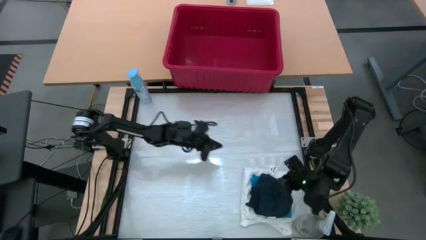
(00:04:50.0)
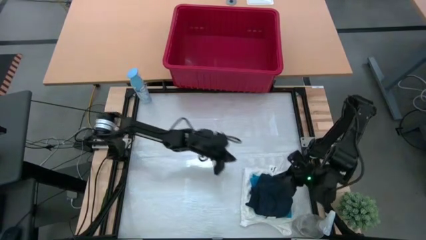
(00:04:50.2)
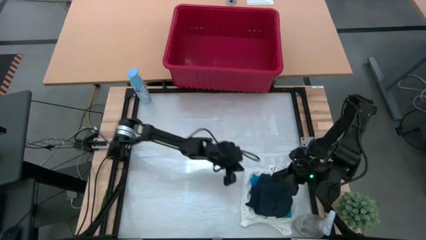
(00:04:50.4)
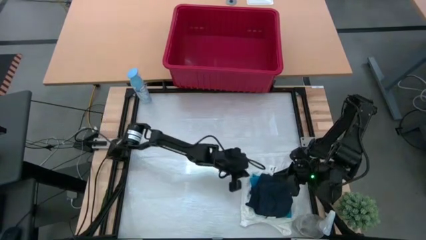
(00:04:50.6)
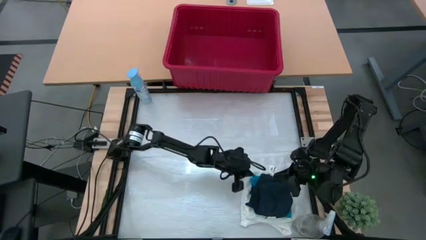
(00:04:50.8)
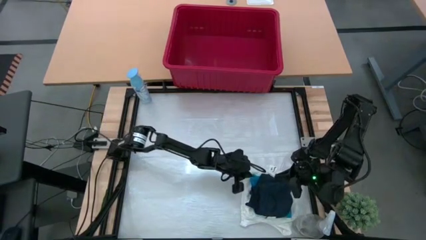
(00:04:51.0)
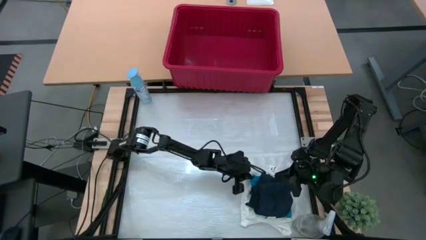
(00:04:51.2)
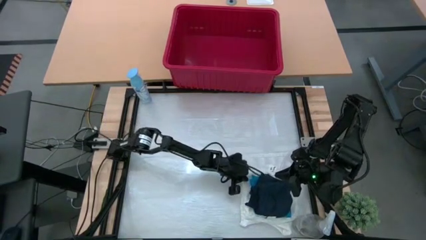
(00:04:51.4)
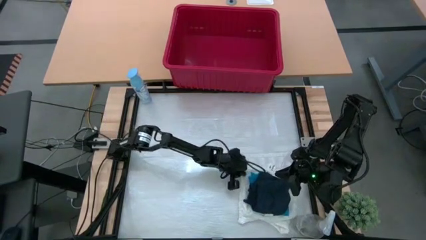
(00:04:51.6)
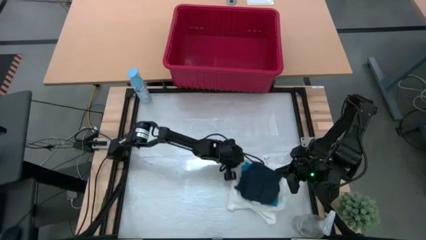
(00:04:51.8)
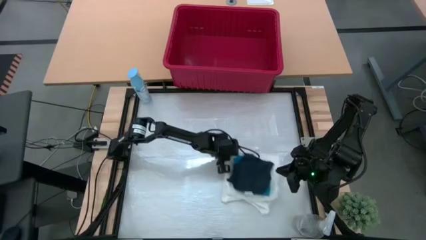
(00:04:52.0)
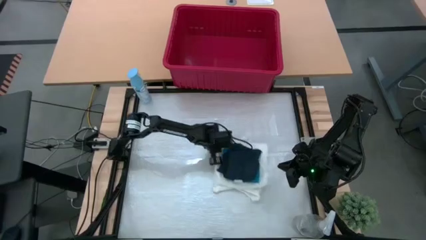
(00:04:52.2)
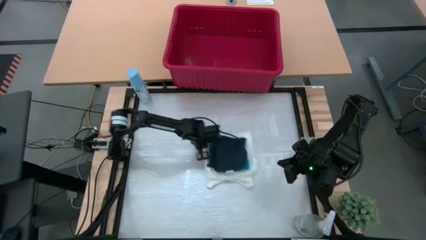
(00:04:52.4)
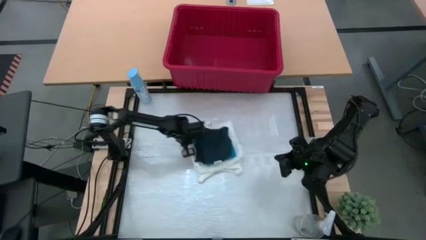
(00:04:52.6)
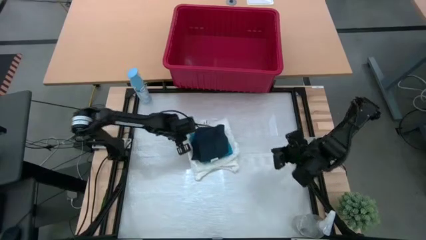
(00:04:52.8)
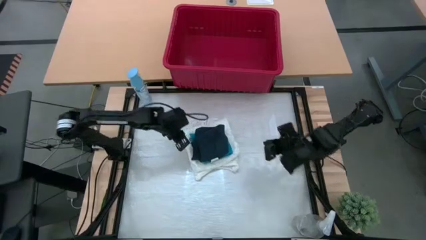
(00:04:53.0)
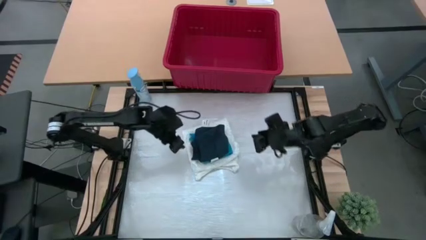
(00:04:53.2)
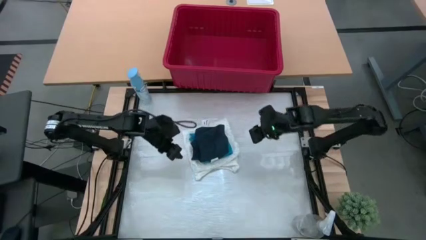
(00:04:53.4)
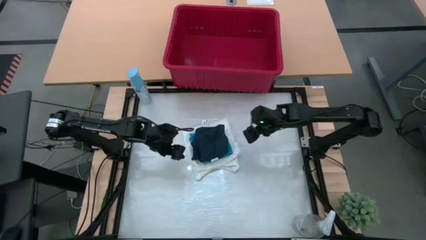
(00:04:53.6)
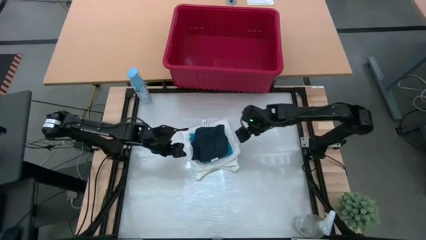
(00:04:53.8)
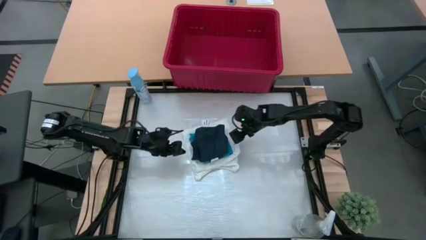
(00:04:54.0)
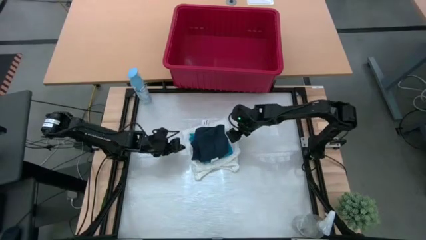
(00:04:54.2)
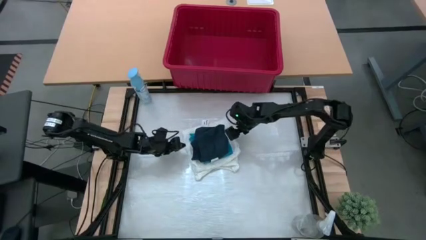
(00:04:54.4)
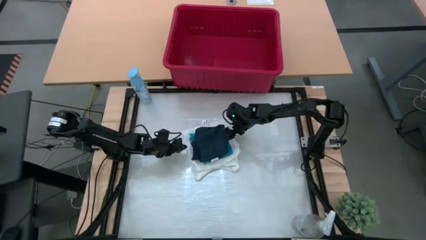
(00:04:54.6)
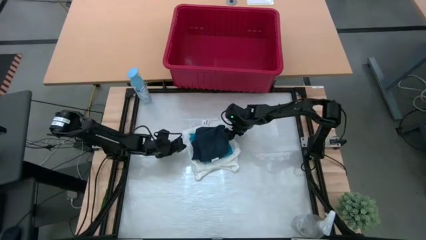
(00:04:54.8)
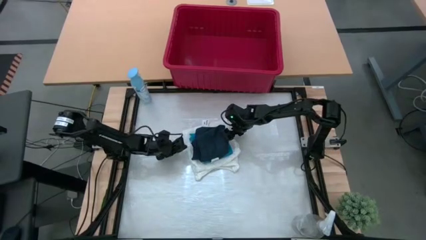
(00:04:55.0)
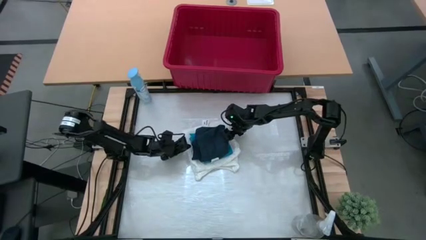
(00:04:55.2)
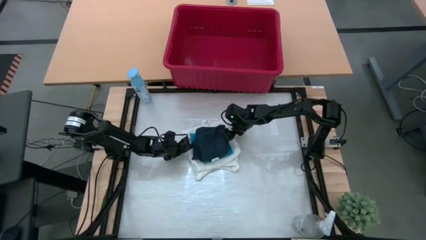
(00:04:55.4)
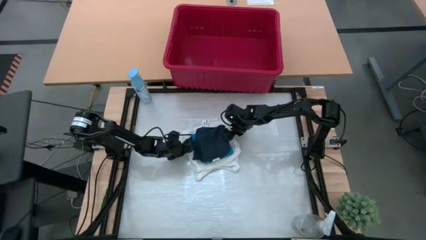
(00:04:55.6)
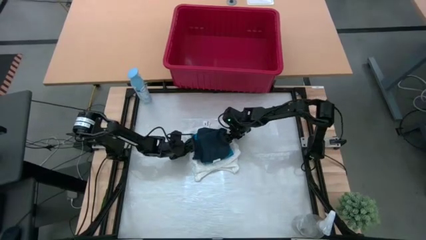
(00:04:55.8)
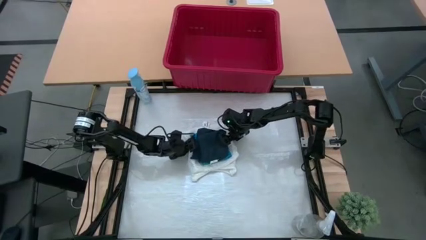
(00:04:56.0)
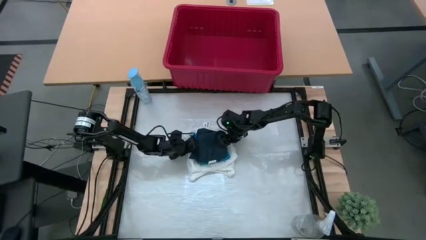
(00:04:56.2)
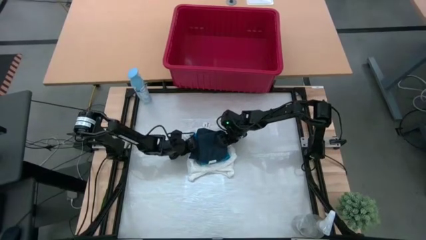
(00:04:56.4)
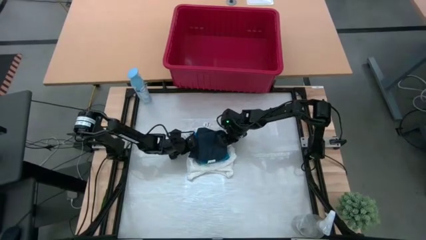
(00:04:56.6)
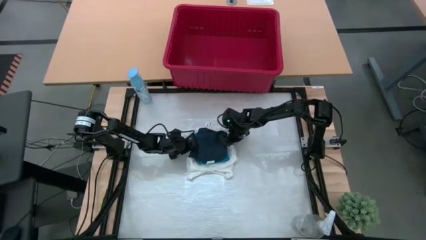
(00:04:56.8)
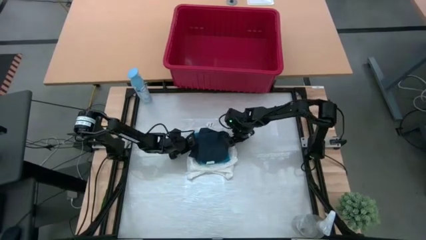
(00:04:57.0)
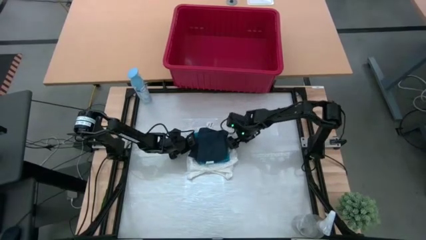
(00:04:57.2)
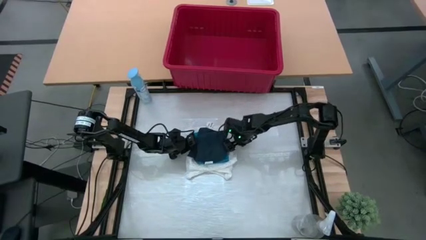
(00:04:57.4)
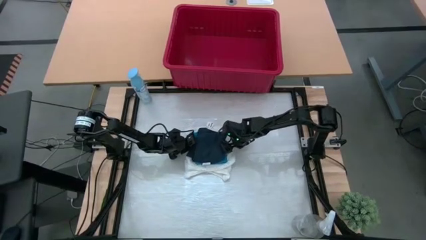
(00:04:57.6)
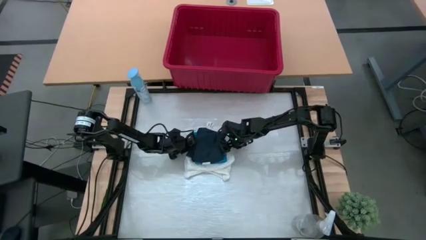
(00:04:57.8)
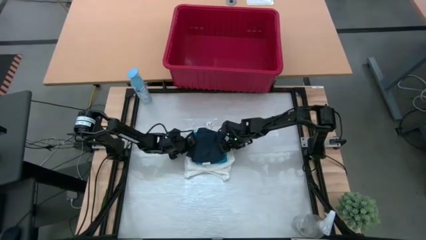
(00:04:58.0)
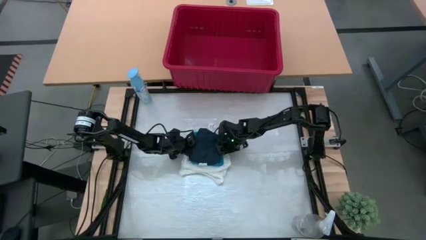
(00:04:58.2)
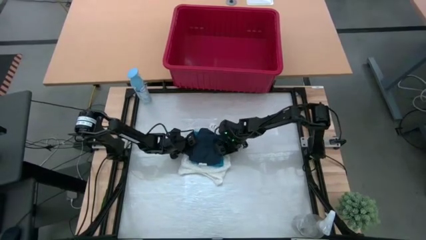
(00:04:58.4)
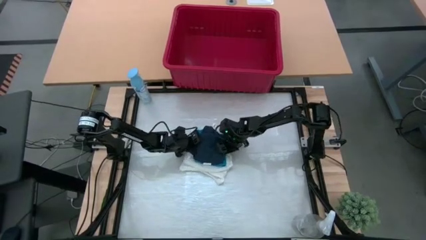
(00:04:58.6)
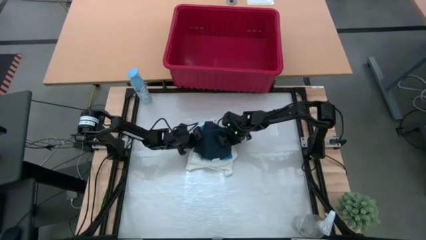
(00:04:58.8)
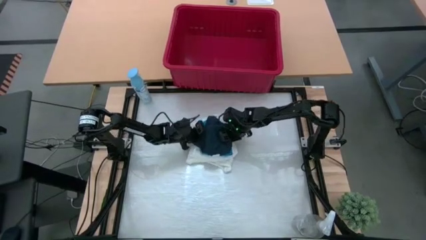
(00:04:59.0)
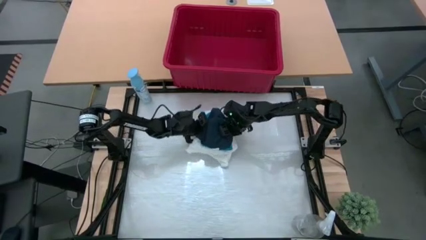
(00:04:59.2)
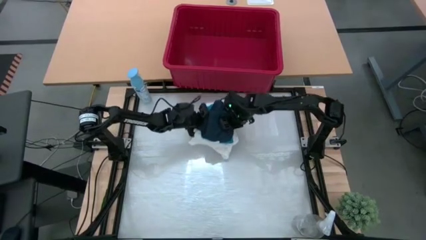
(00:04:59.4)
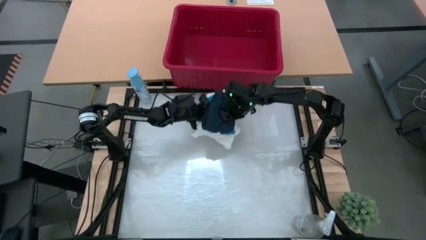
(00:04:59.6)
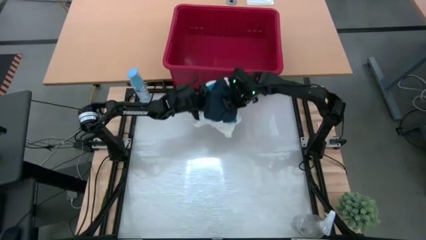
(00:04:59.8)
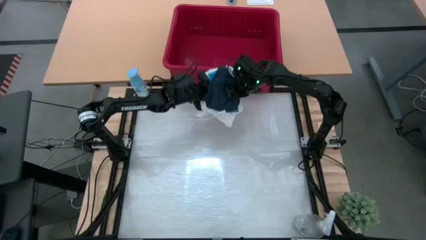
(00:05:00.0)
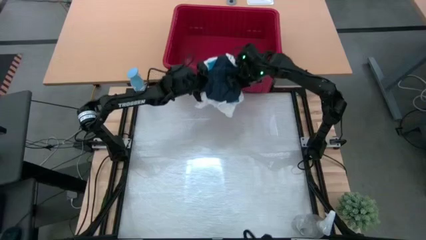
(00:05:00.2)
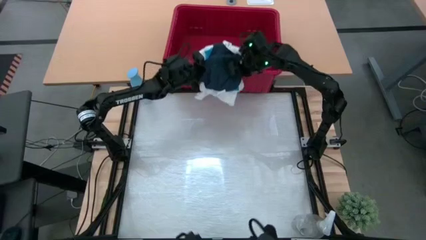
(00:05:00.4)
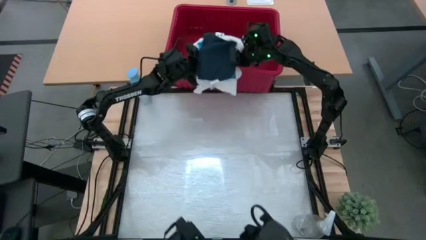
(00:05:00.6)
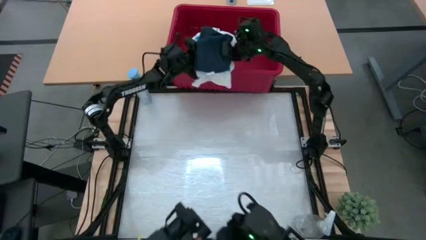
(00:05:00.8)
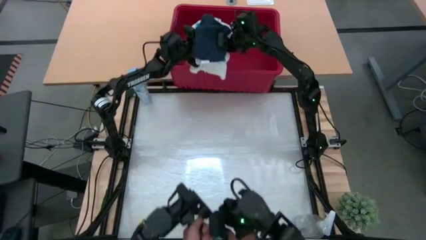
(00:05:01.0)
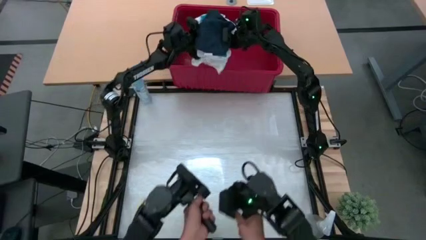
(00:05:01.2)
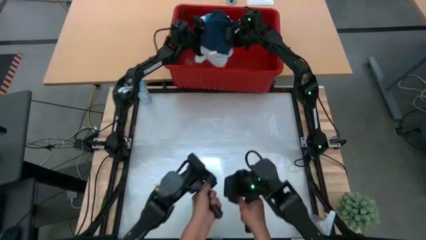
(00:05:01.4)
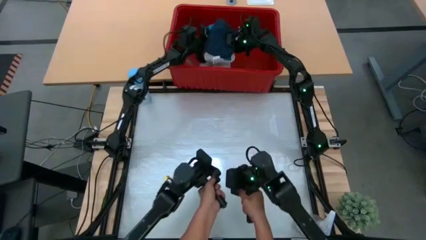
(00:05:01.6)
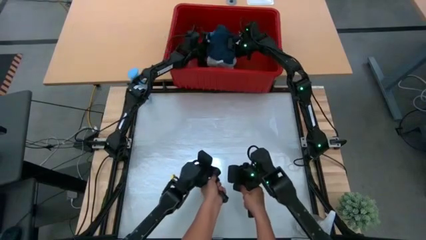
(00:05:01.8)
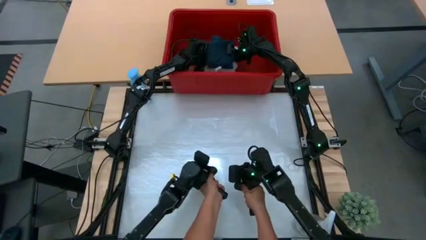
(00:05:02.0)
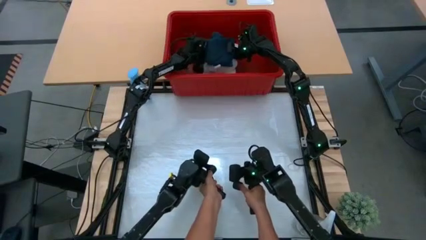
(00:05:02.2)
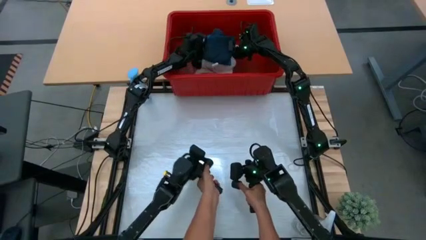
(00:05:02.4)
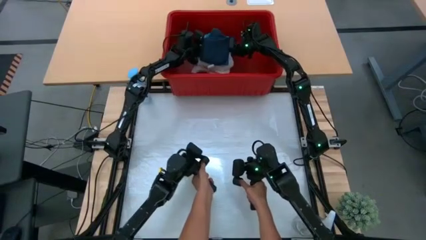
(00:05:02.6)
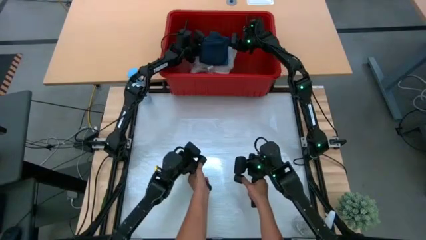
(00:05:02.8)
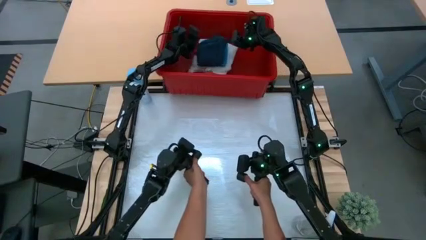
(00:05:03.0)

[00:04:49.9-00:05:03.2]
Task: Fold laundry
Put the folded stacked clothes into the red laundry bin
